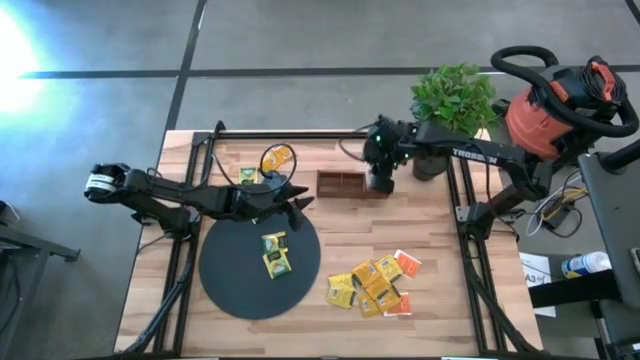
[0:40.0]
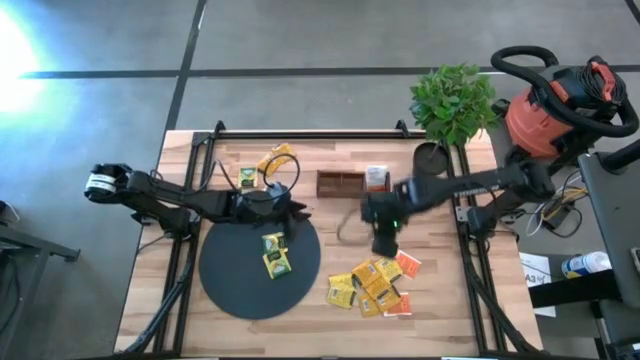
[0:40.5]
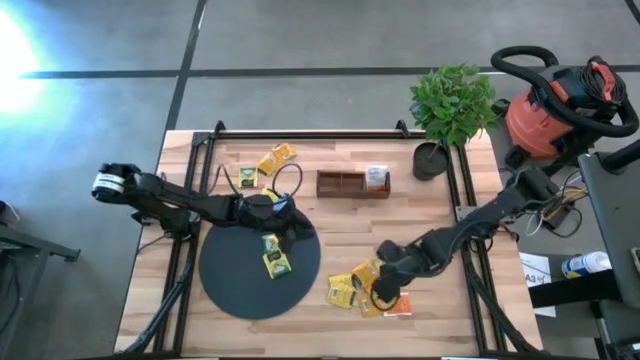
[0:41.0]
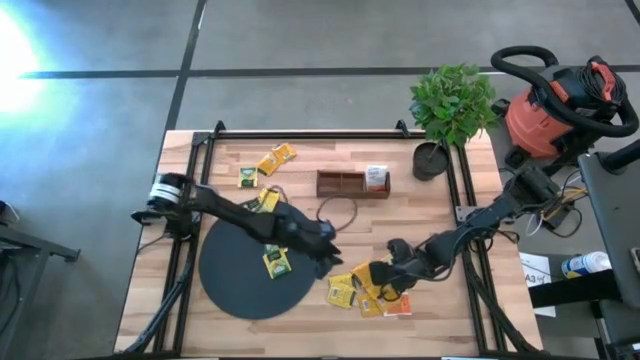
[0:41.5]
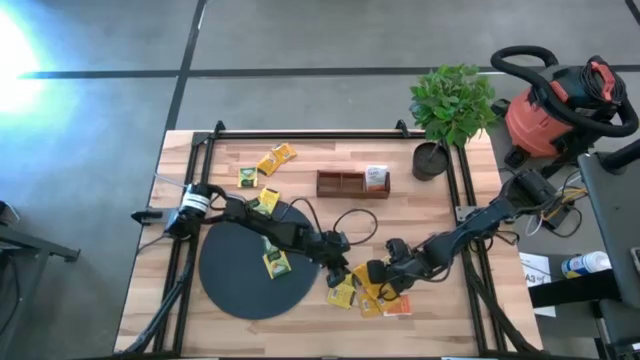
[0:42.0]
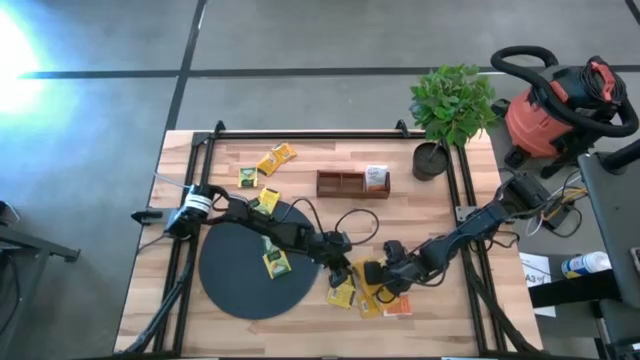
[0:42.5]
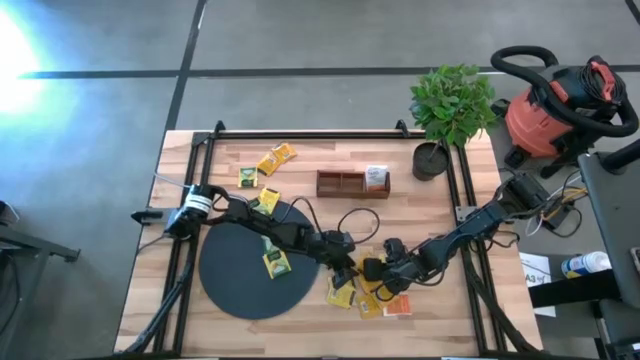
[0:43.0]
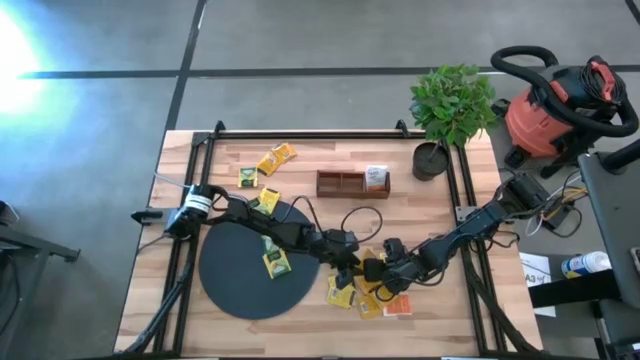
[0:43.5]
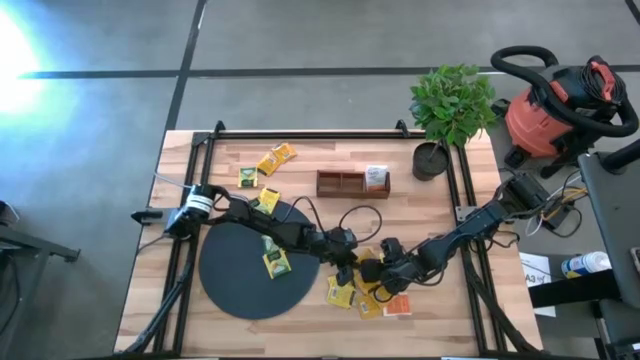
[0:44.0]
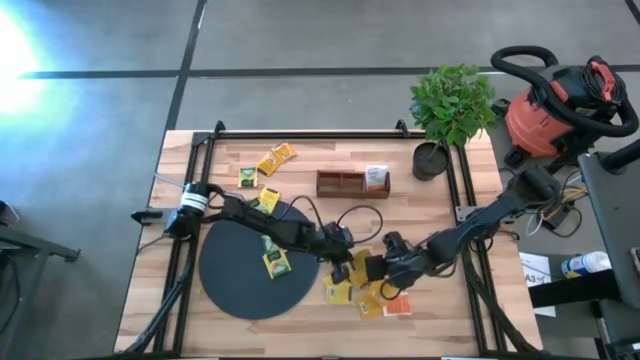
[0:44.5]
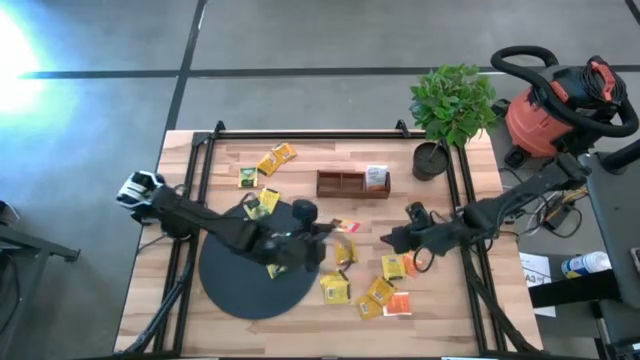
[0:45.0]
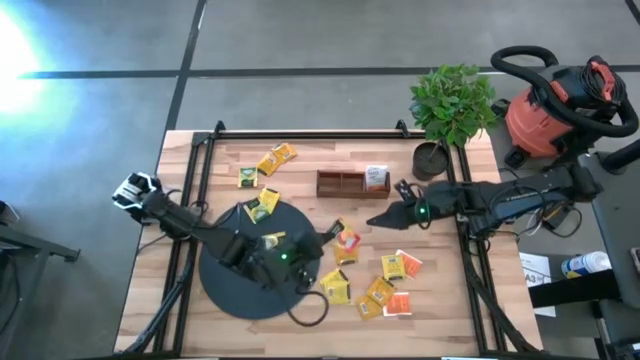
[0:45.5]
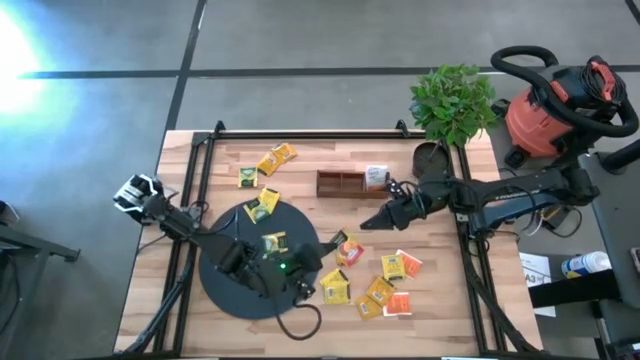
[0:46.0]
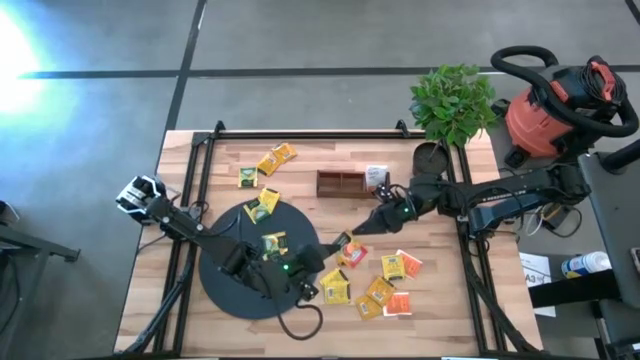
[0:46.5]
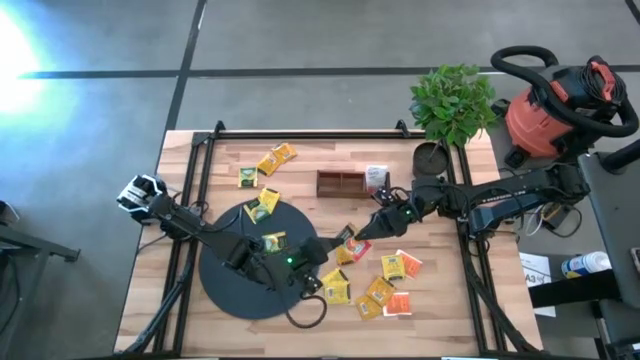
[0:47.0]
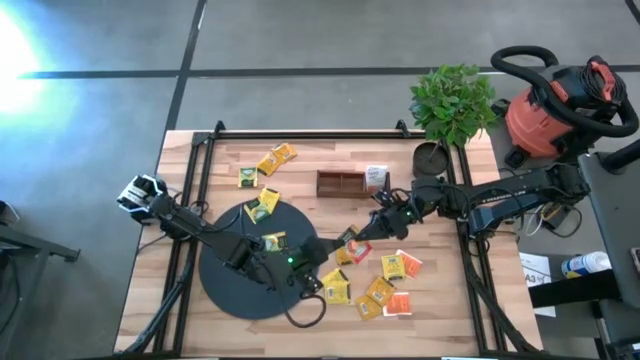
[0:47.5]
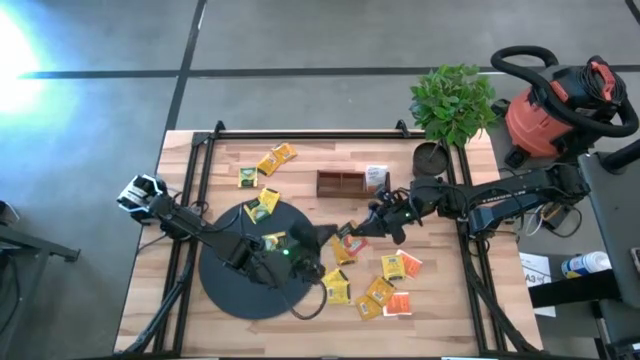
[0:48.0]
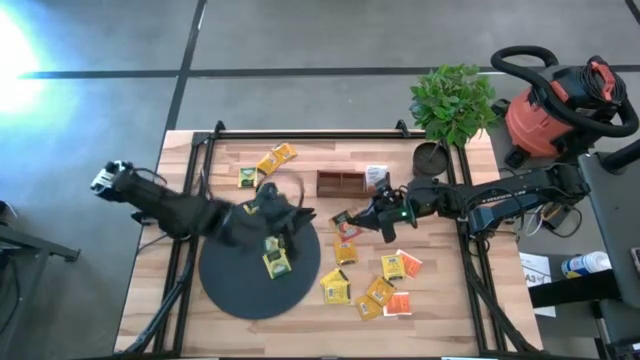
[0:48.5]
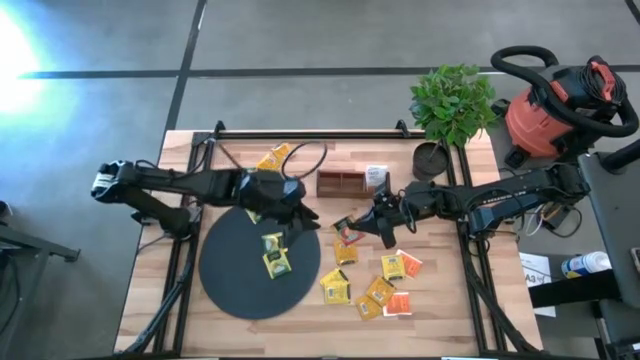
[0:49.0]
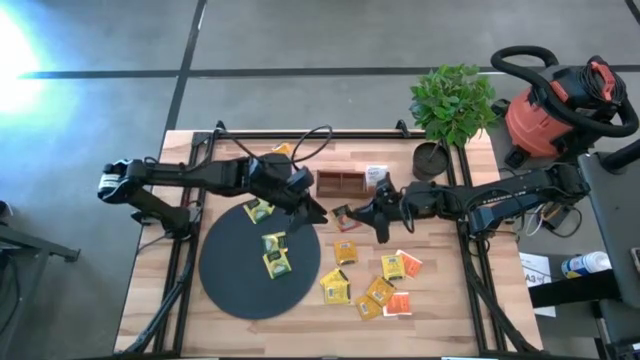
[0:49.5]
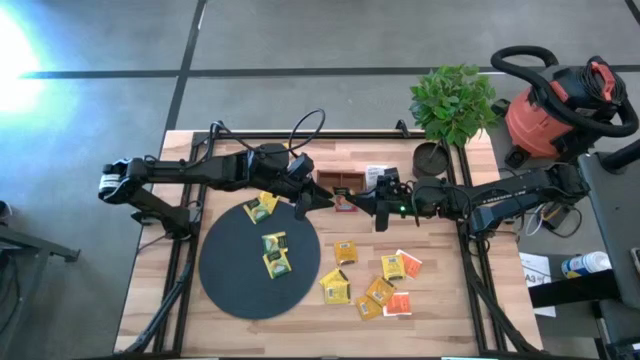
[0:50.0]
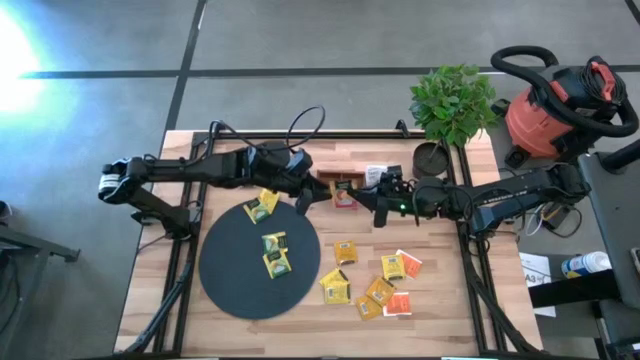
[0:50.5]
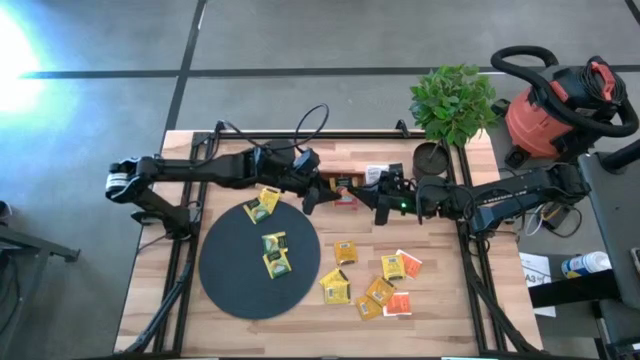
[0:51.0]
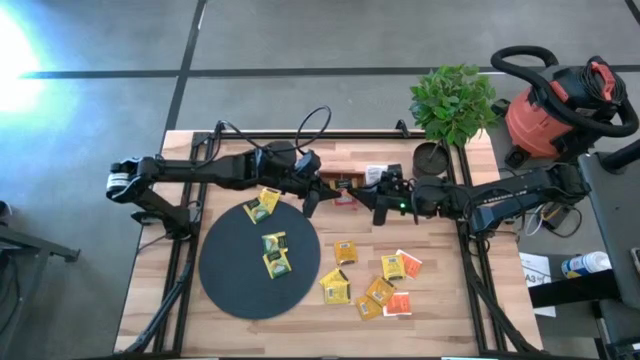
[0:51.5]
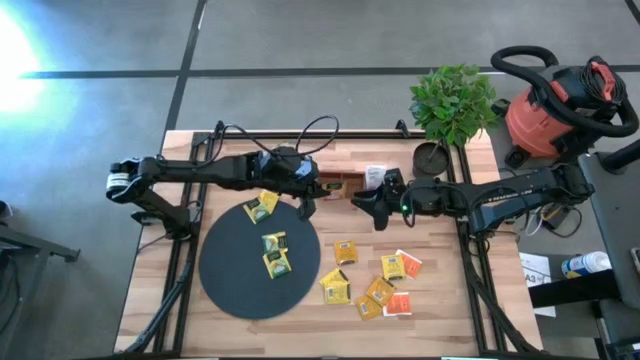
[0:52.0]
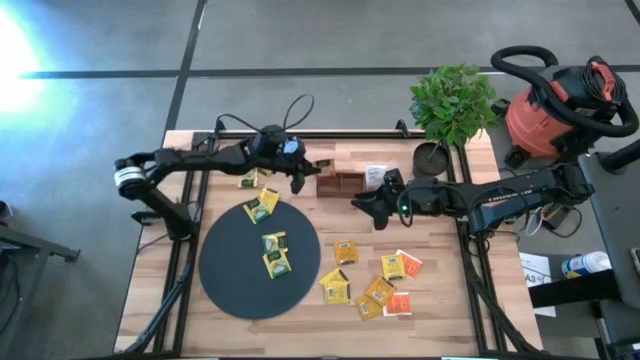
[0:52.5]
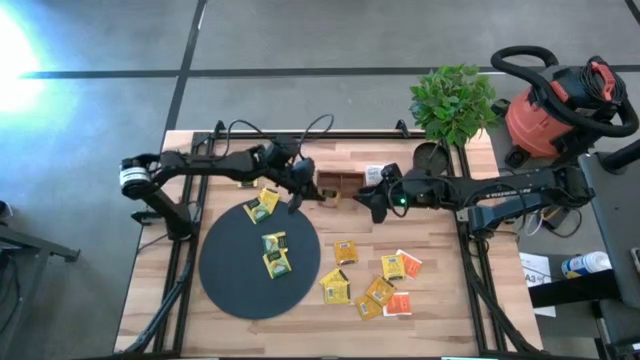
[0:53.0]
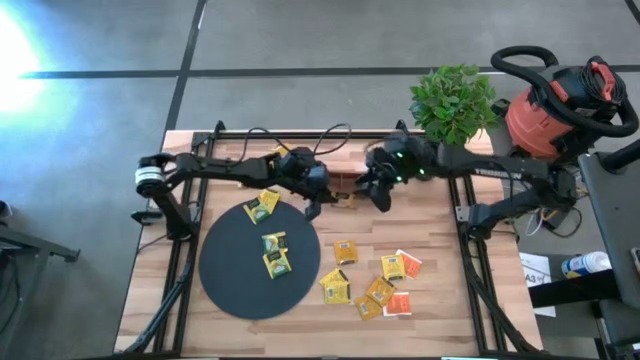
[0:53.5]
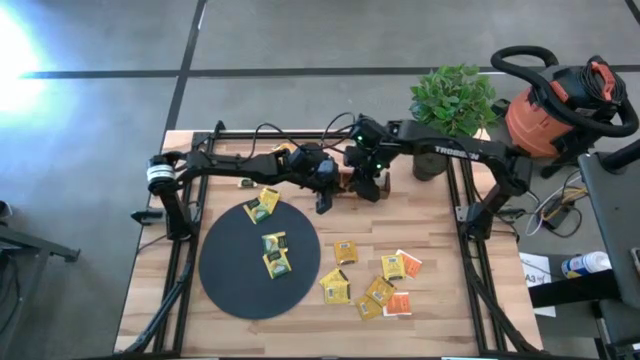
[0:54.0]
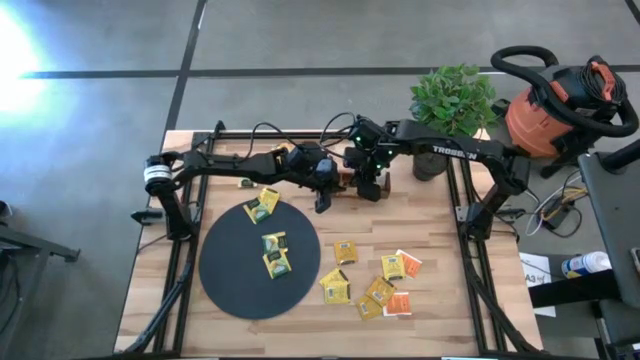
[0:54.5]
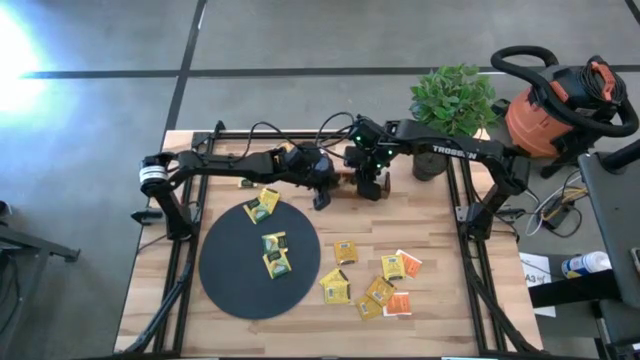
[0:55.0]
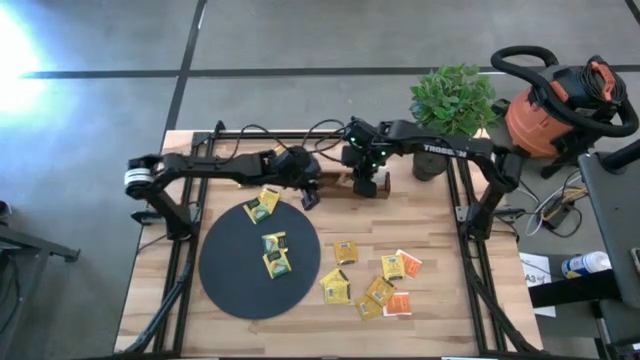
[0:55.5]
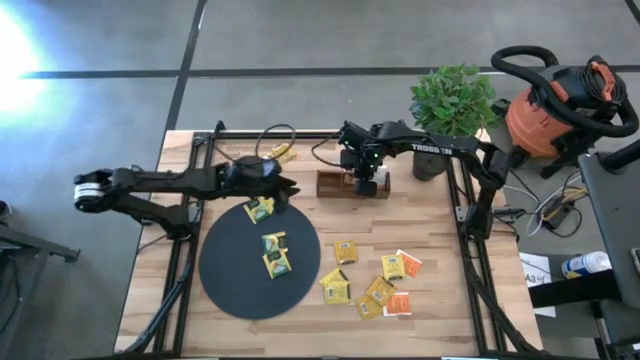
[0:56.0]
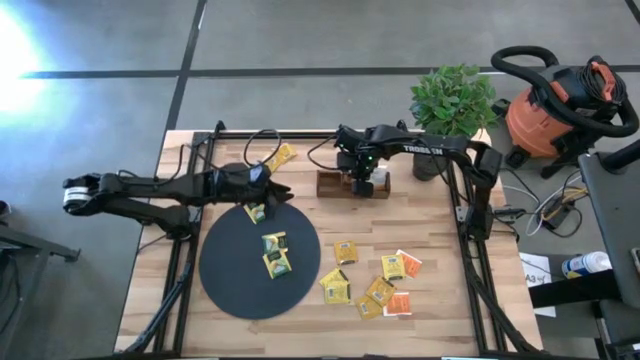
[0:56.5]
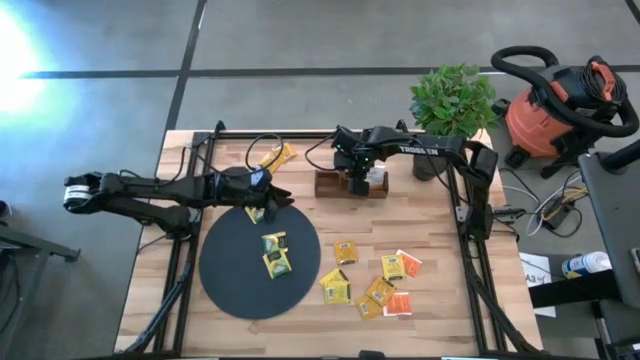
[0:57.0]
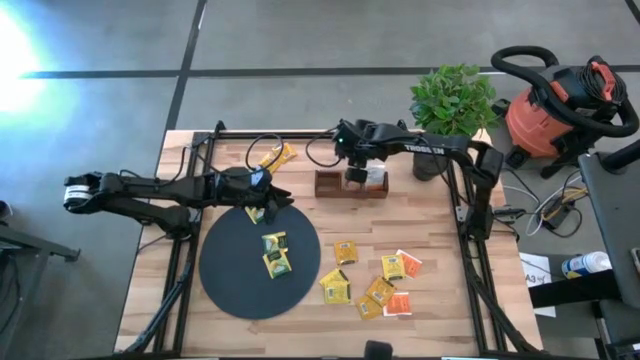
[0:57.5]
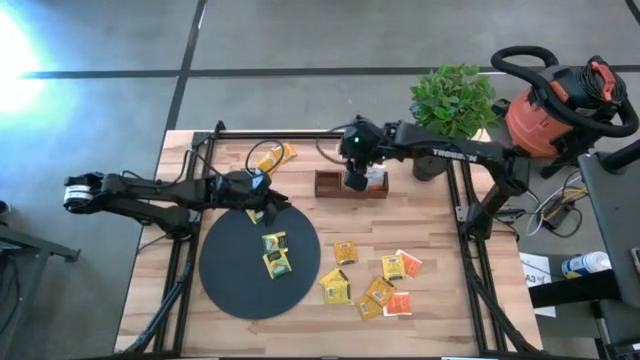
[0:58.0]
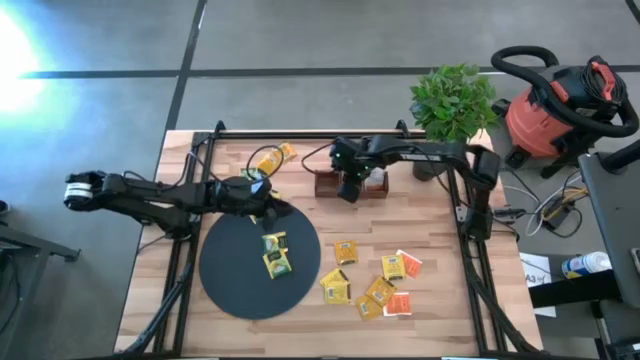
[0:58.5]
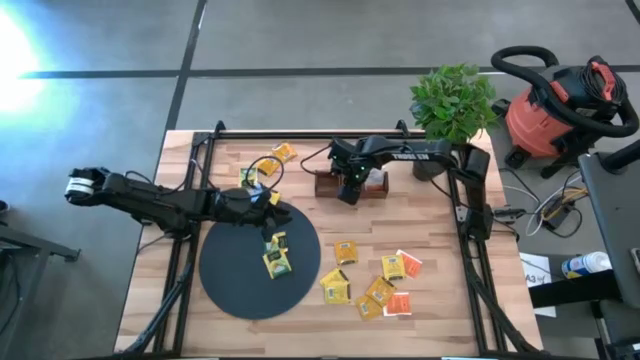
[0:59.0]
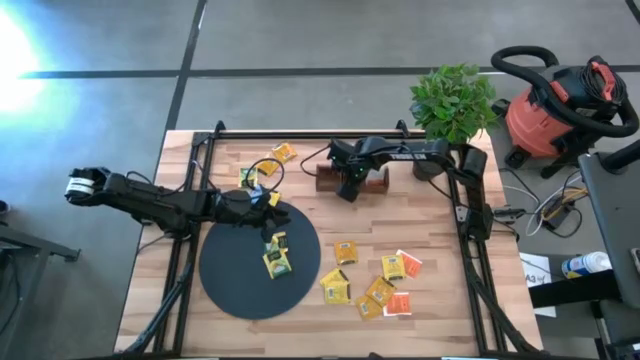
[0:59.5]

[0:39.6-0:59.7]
Task: Pick & Place Tea
Put the orange tea bag into the middle section of the wooden organizer
